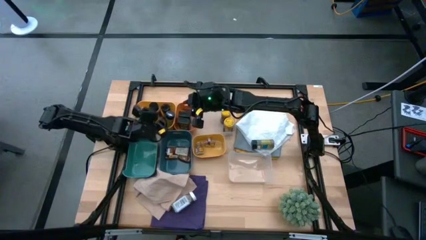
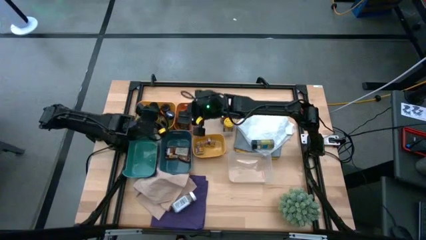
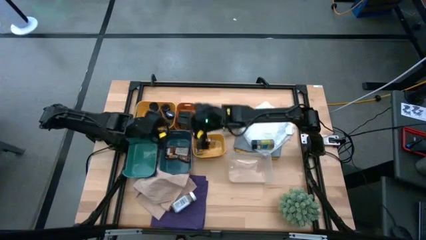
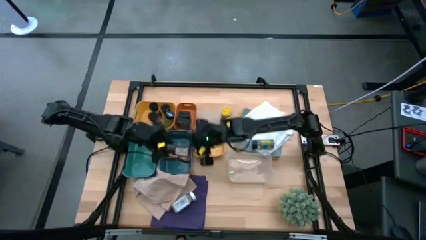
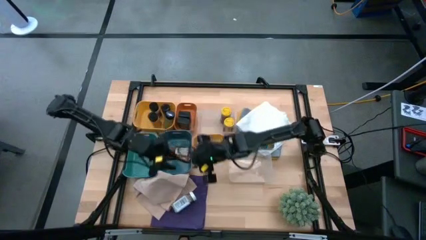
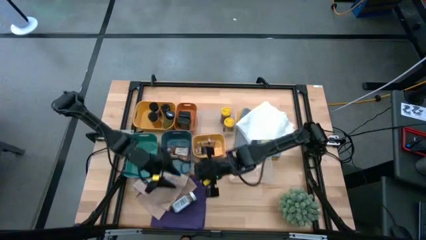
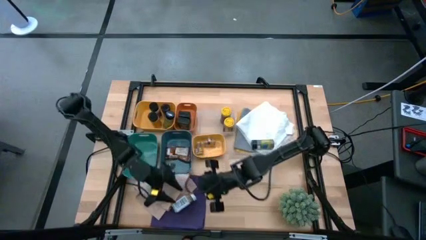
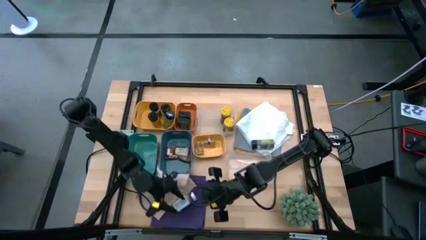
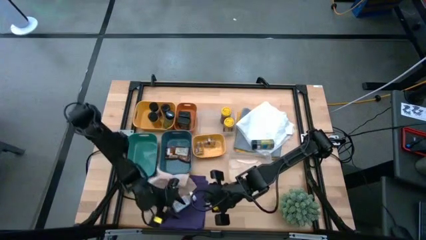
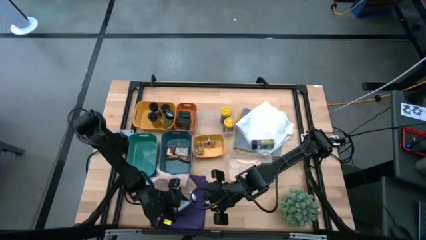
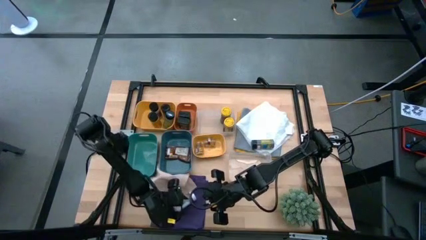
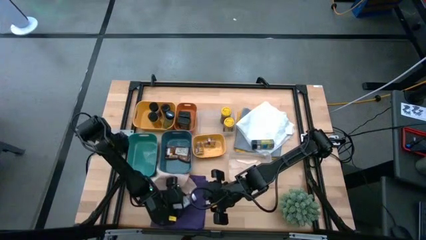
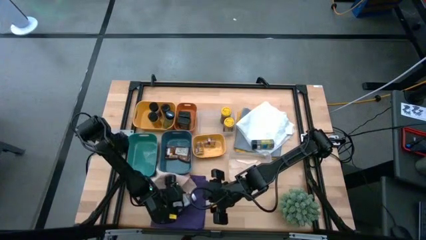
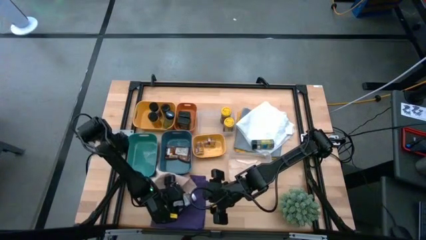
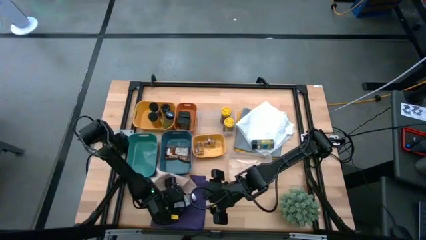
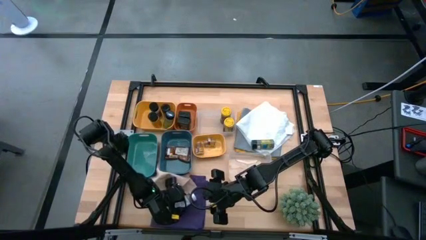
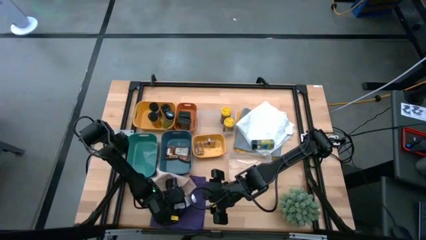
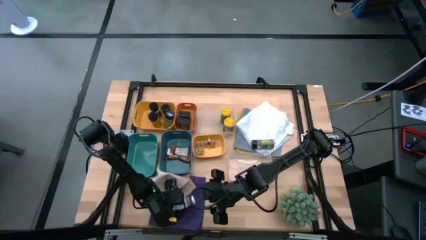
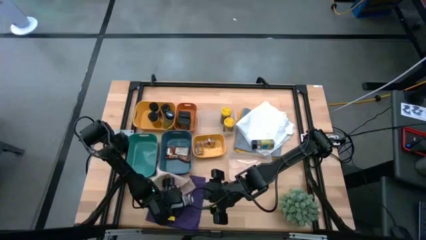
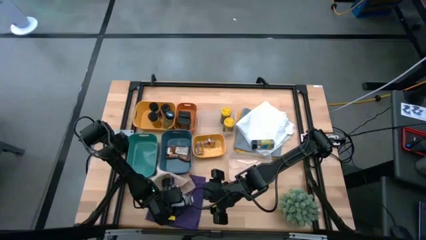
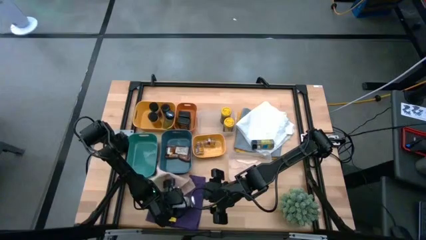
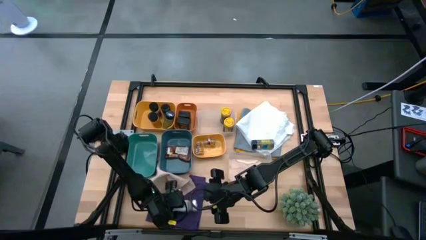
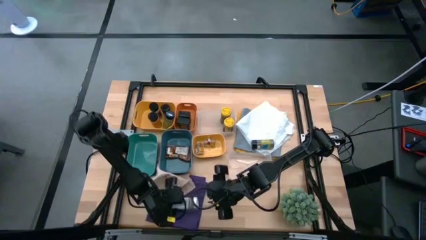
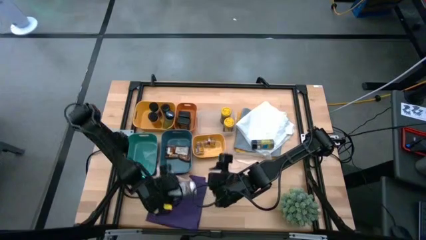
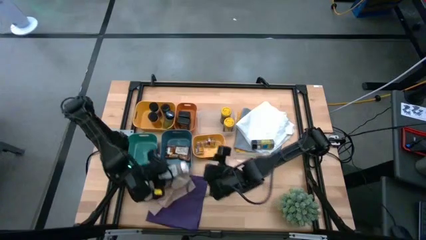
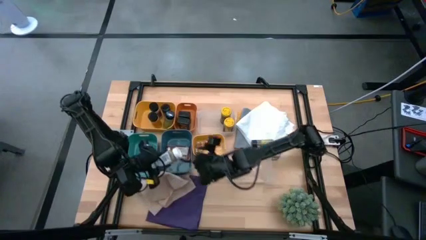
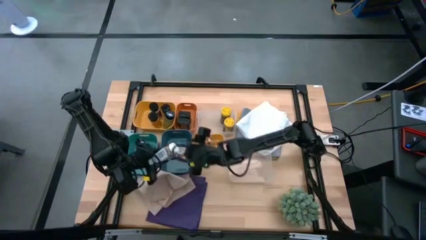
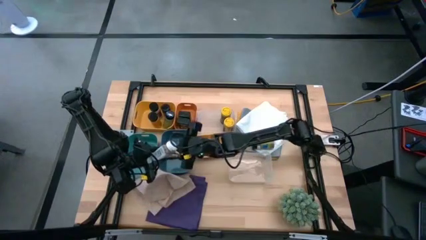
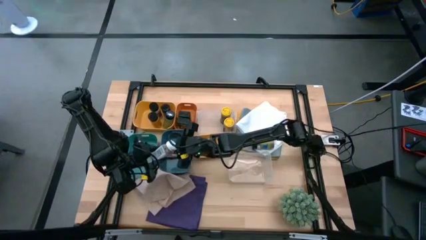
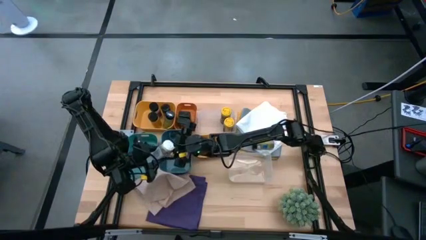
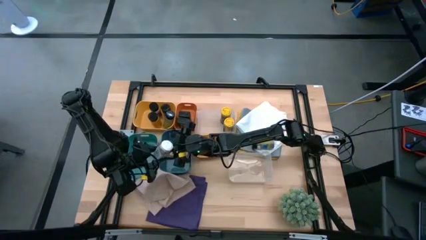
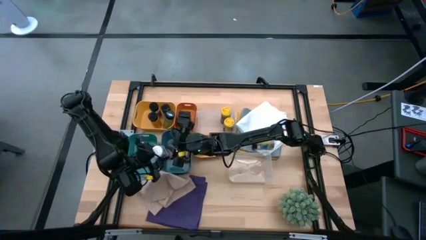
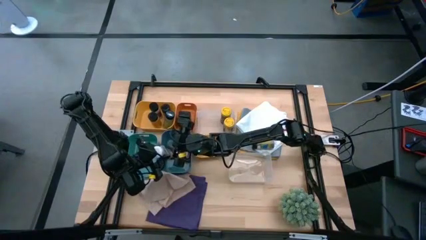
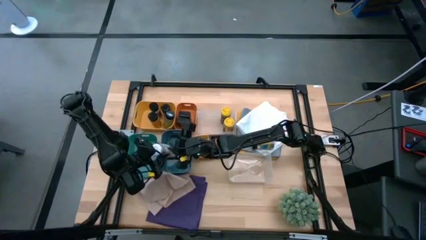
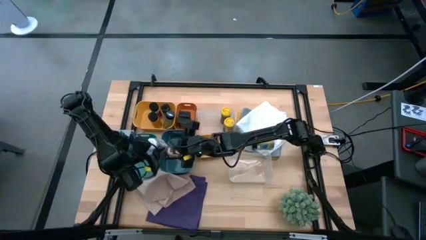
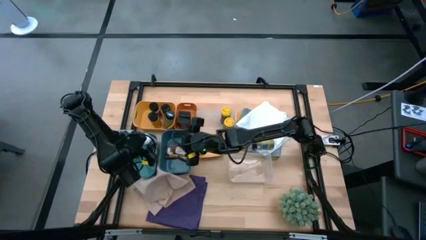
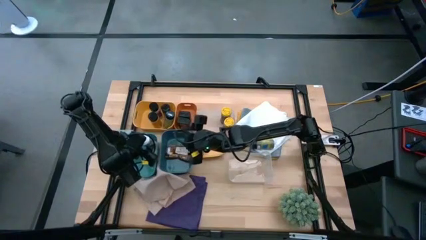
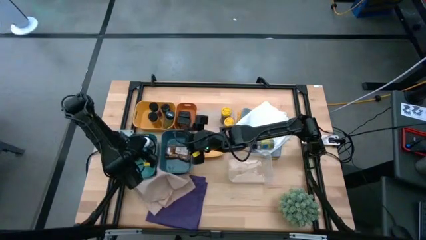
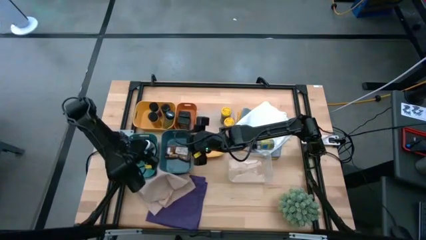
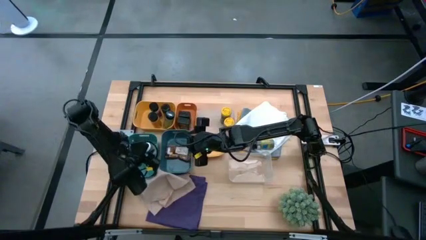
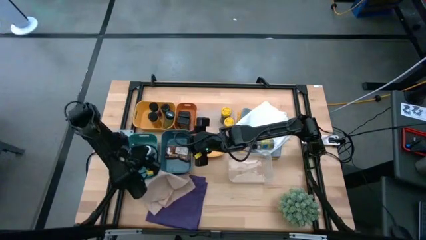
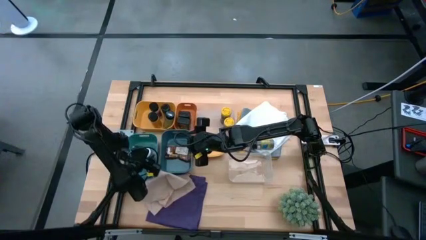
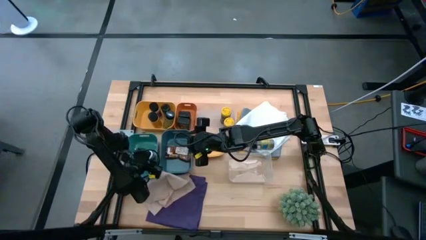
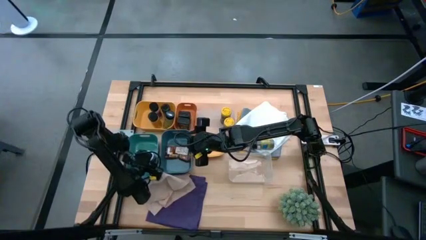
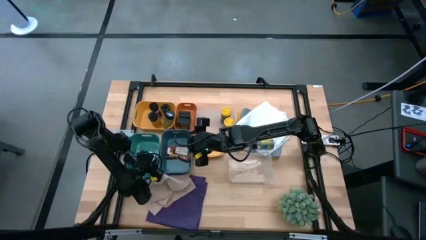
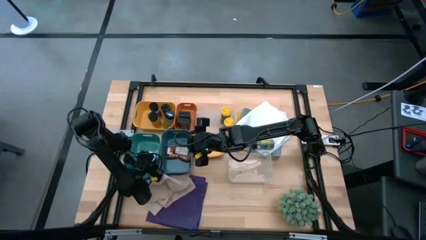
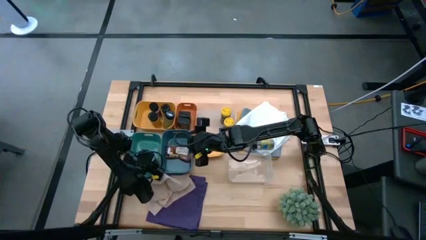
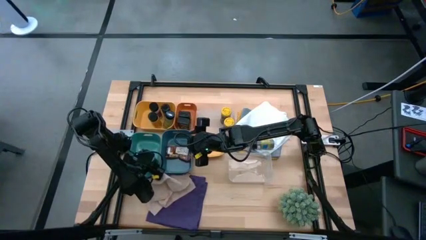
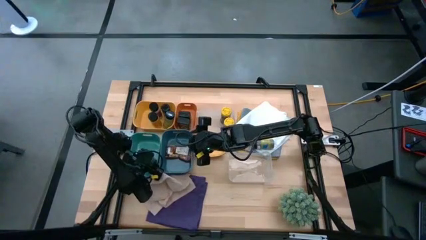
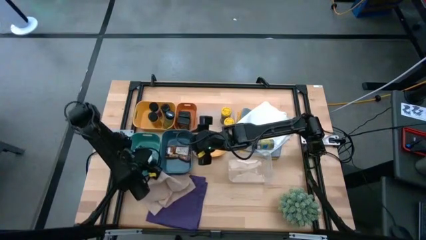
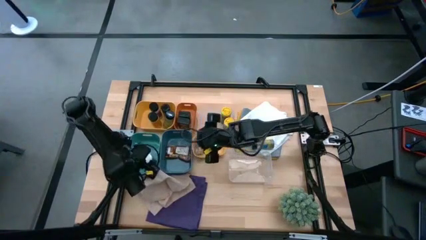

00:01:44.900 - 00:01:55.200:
Task: Sort spices by type
Put the white spice bottle into the green bin
